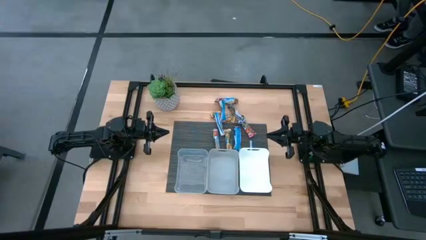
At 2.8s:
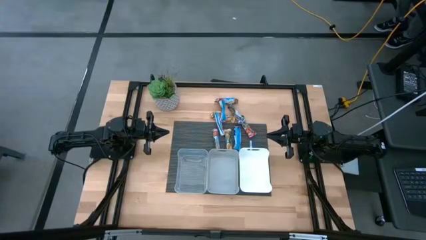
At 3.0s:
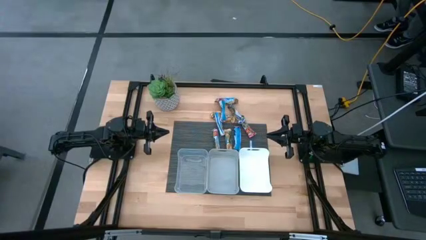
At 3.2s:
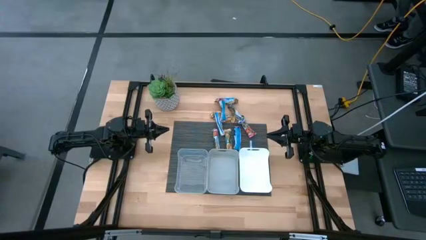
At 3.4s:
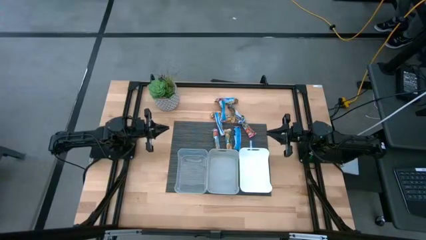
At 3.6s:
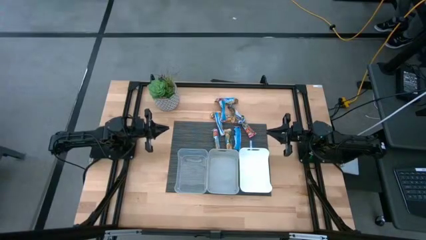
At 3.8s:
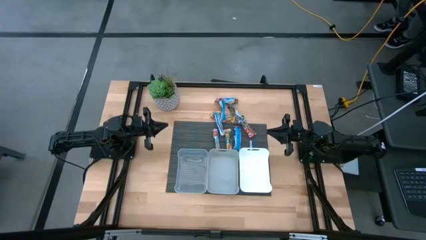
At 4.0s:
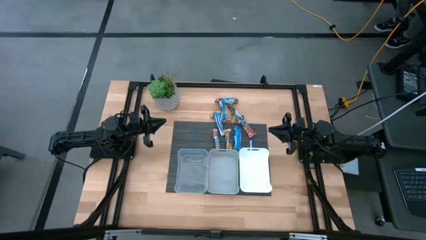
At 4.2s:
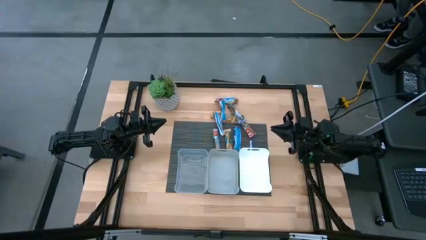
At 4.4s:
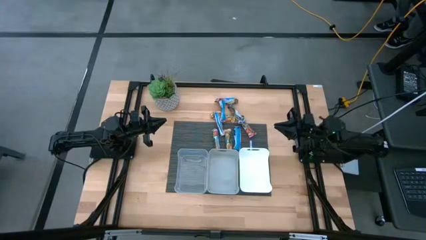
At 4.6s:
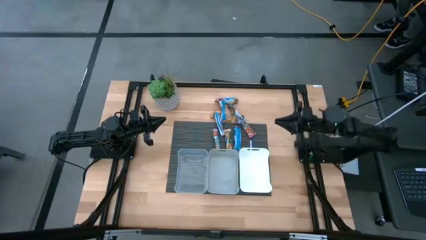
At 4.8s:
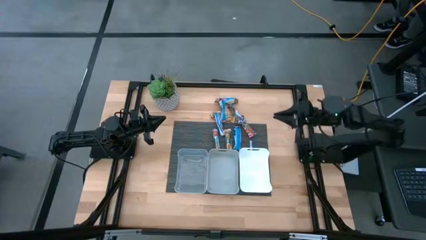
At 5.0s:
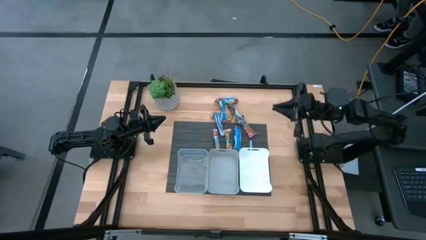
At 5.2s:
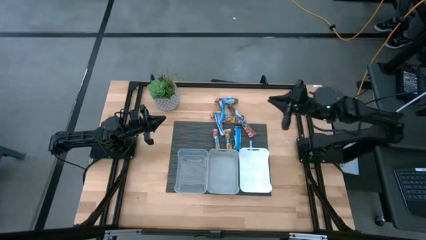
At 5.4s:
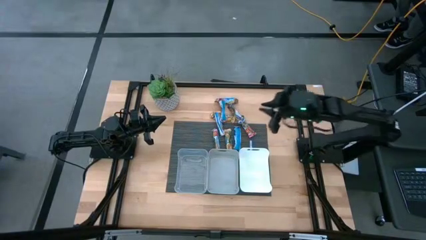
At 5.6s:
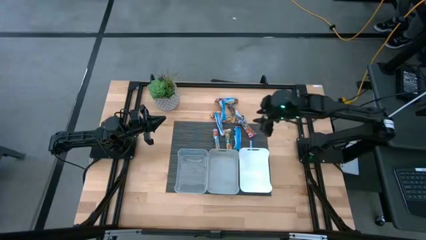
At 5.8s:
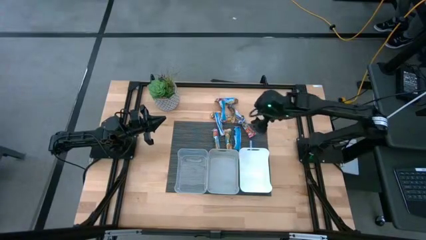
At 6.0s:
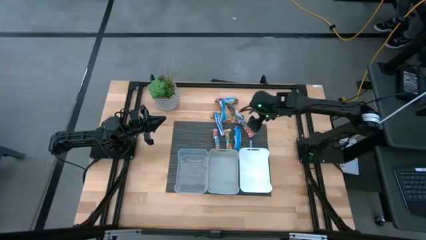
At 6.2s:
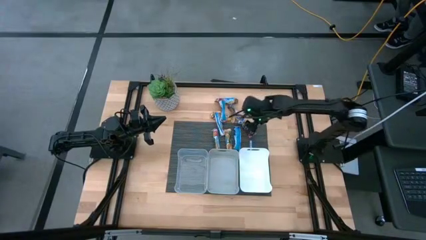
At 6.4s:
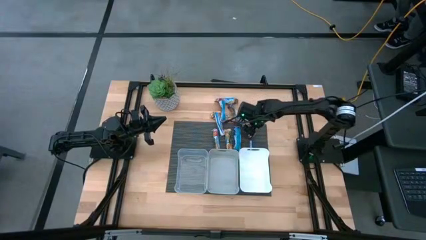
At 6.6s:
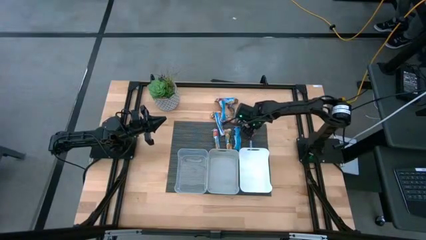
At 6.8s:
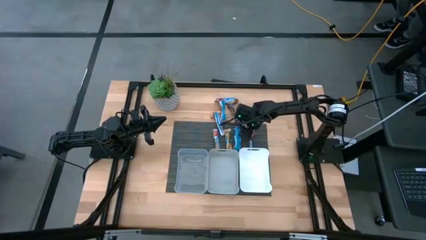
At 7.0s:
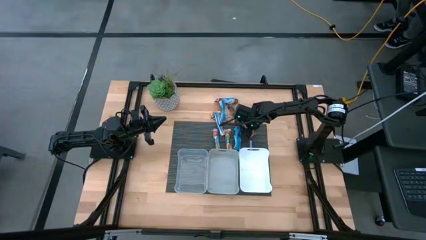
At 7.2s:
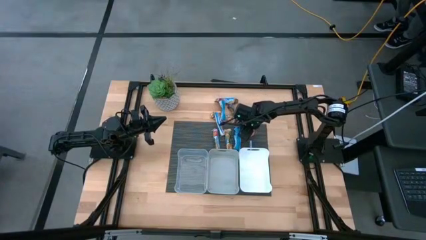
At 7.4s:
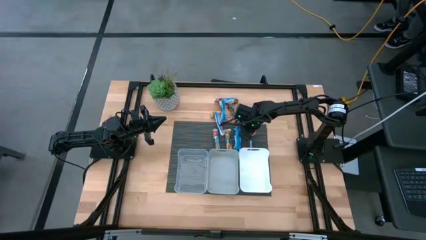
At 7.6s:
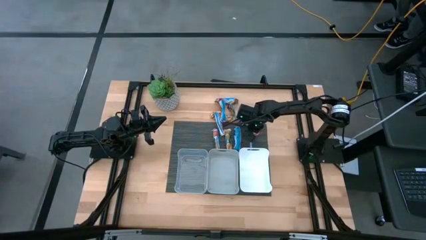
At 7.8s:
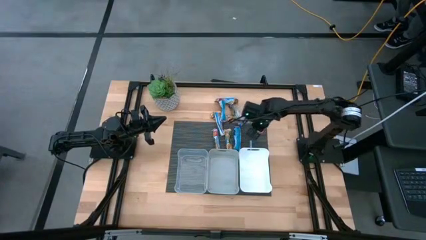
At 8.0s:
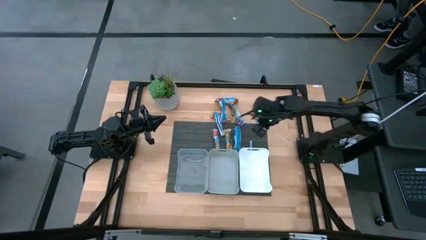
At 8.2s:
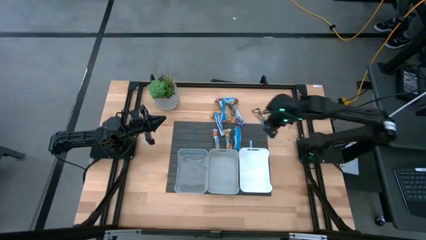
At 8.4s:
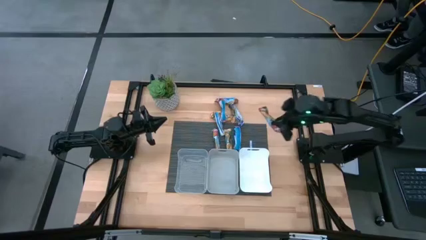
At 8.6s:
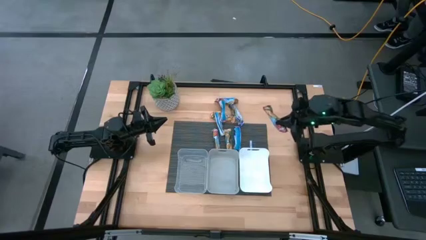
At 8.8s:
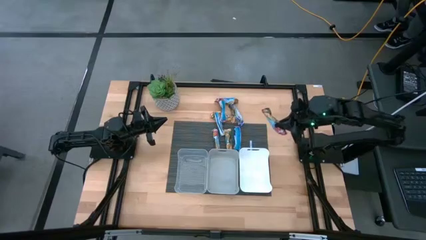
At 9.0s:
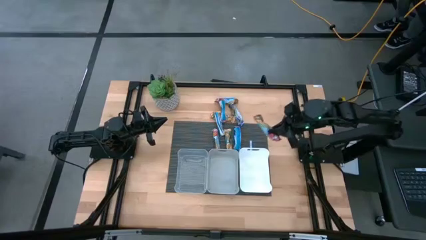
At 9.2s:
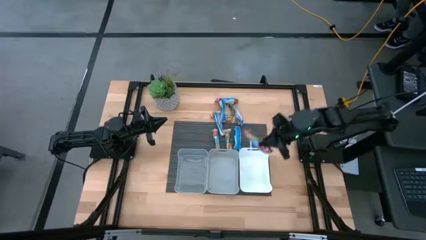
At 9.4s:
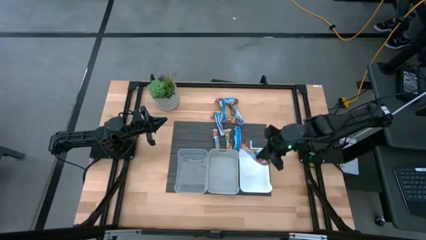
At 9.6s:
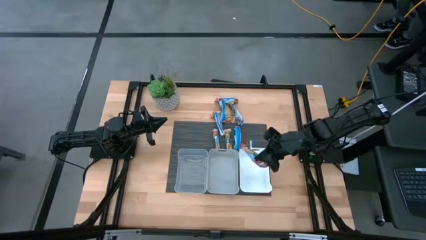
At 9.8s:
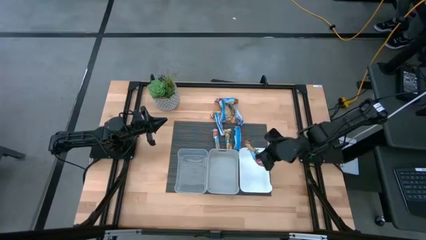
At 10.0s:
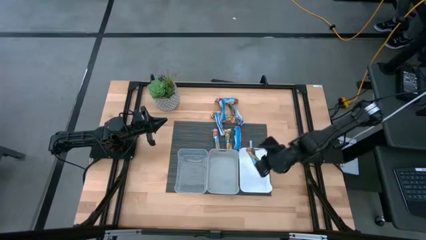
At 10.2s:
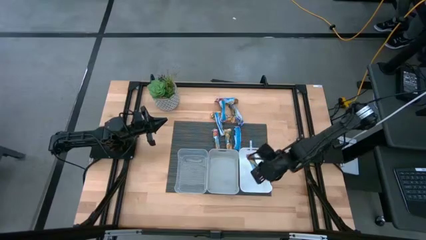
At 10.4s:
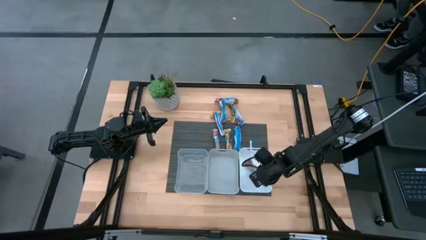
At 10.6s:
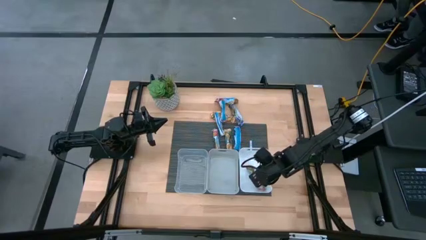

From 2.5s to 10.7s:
Task: Pick and place Granola Bars by type
Put the red granola bar into the white bin

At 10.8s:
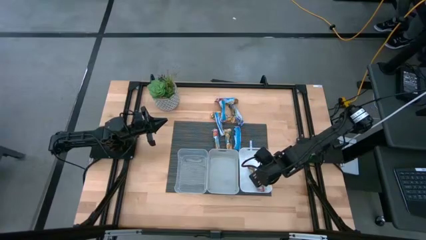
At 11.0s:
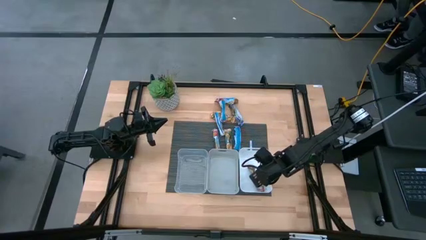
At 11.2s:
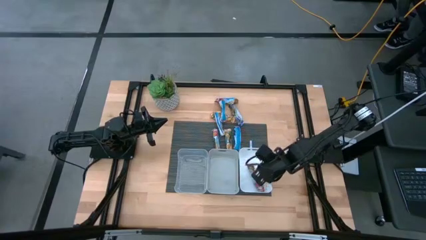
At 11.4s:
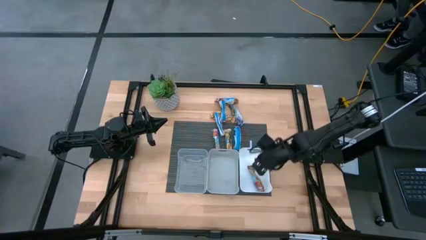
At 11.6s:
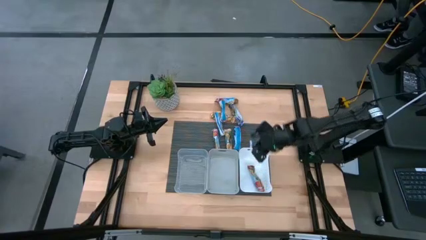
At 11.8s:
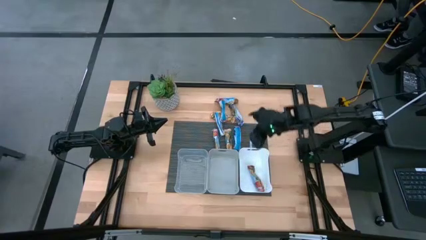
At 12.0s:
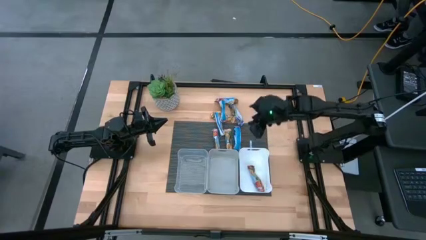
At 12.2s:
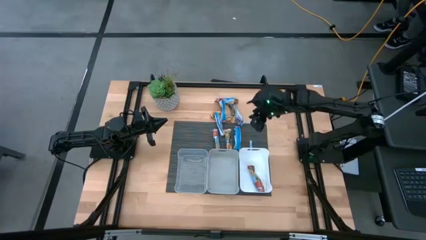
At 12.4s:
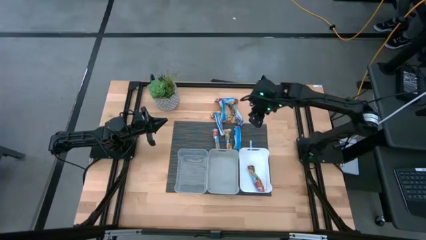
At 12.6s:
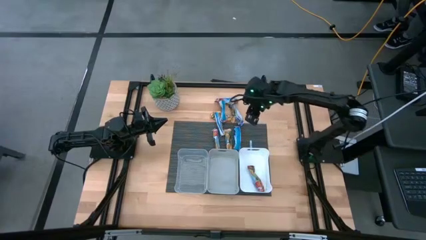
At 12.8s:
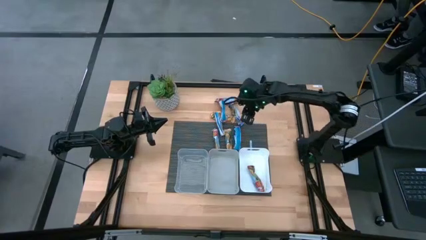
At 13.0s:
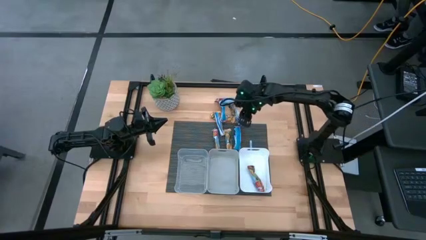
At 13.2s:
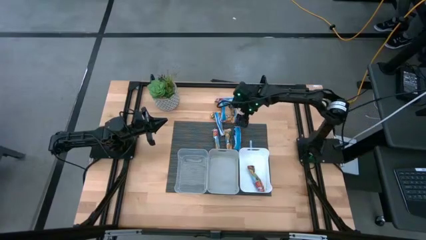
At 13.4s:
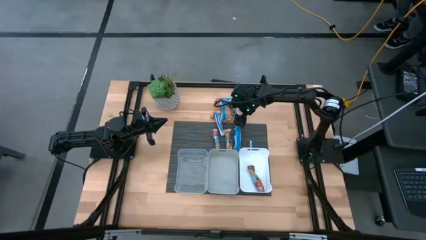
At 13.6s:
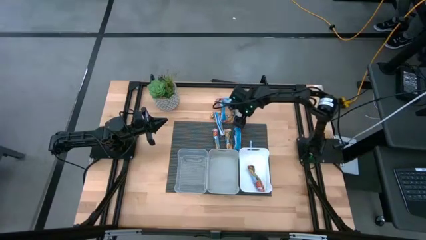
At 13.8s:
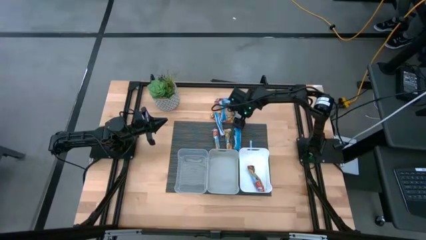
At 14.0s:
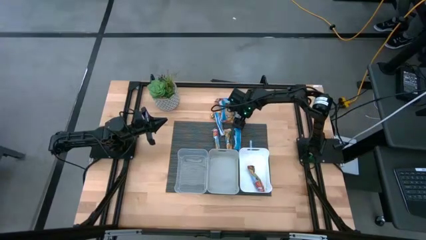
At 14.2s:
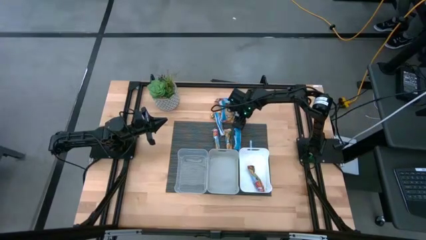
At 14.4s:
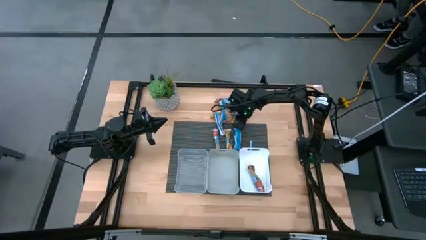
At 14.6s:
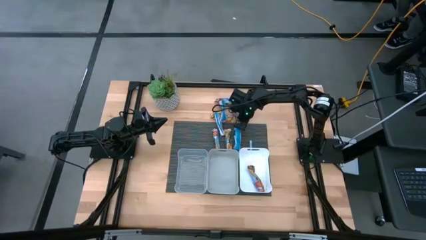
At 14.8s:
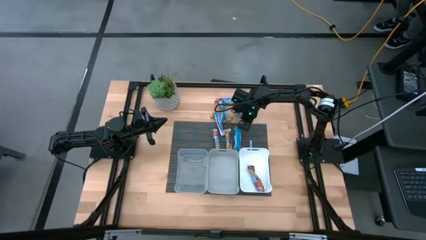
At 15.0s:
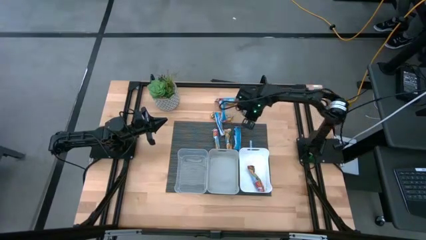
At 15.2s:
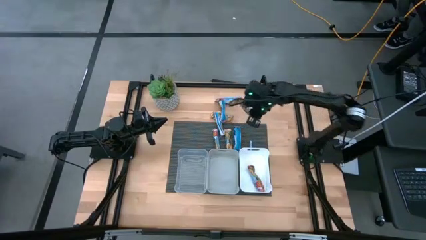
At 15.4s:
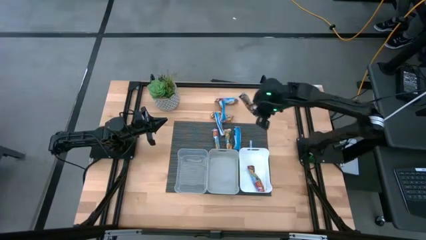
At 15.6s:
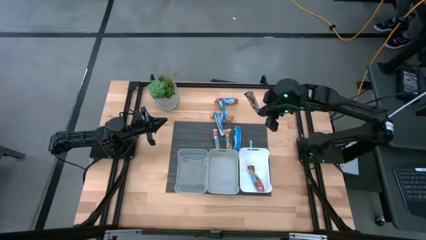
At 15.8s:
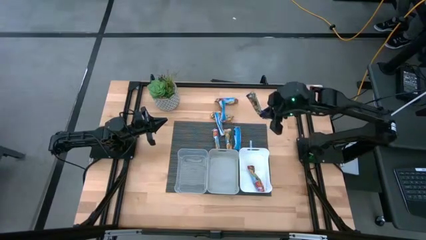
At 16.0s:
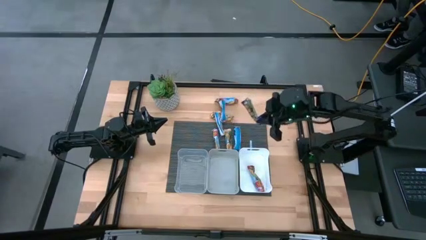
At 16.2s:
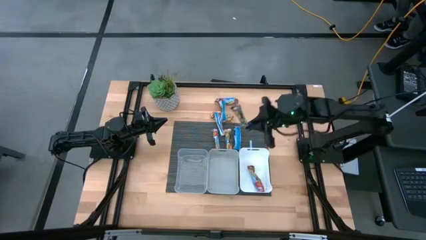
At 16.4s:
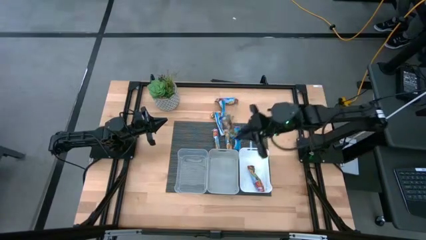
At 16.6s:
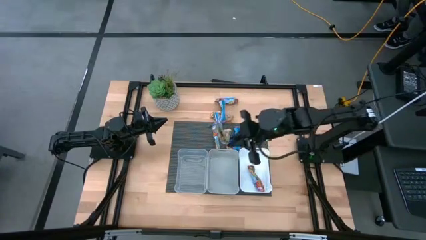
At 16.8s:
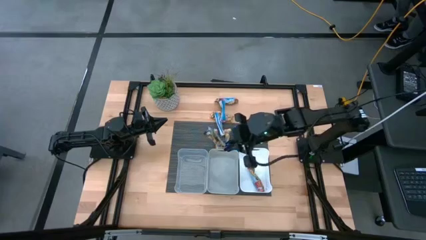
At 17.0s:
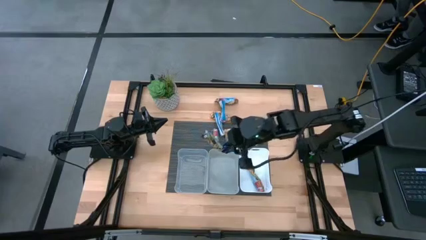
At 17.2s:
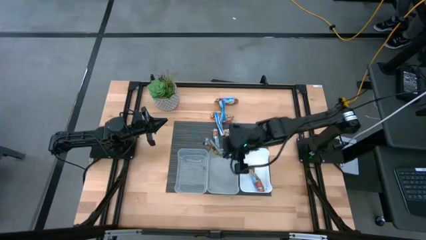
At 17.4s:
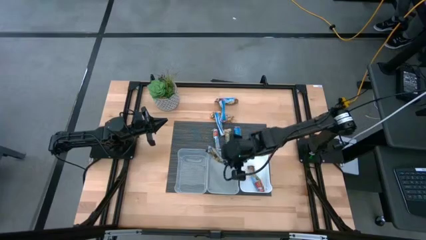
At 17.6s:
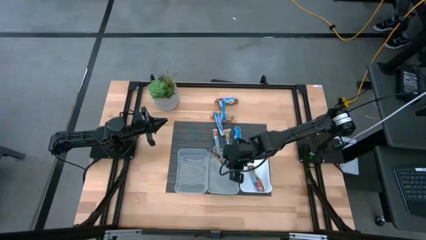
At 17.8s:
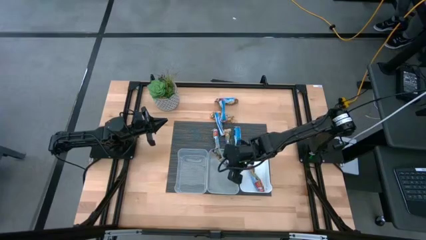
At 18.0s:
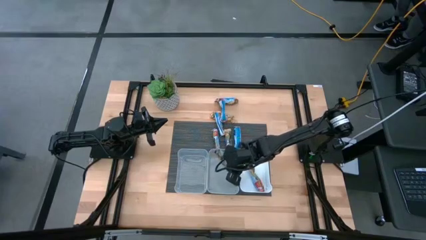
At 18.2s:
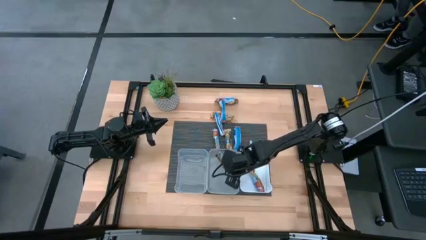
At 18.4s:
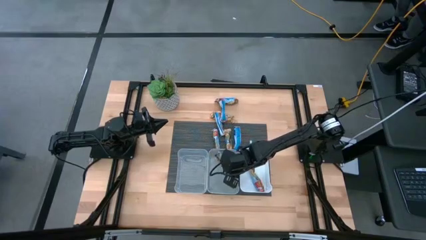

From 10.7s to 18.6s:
Put the blue granola bar into the gray bin
